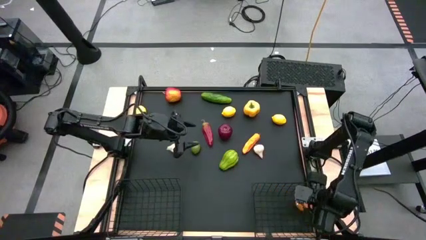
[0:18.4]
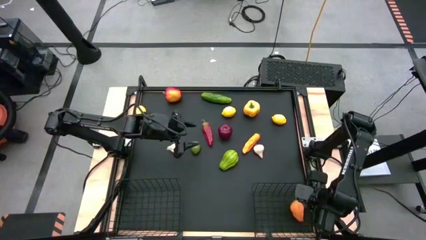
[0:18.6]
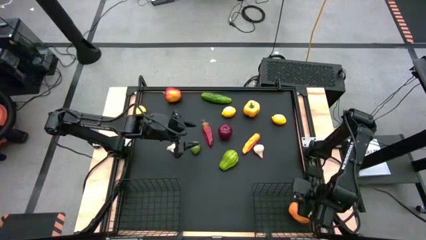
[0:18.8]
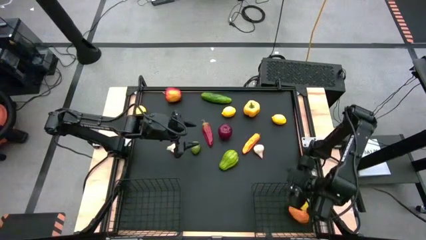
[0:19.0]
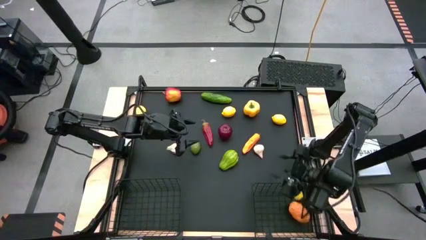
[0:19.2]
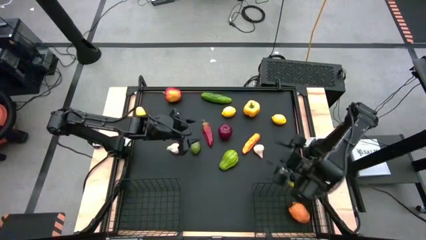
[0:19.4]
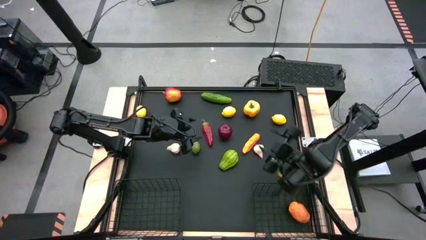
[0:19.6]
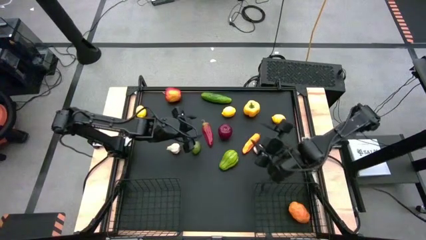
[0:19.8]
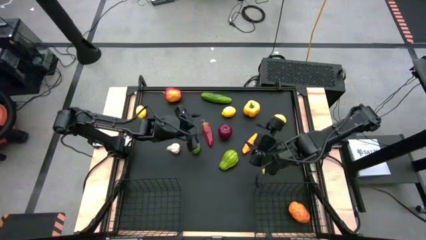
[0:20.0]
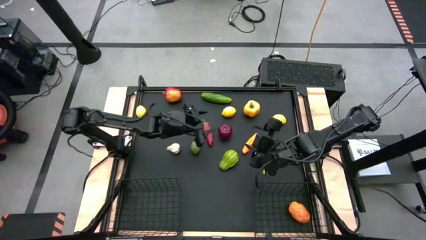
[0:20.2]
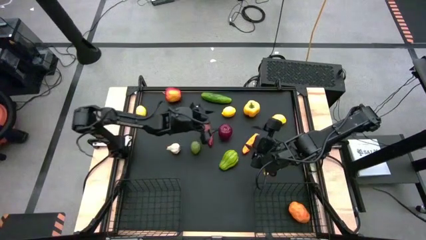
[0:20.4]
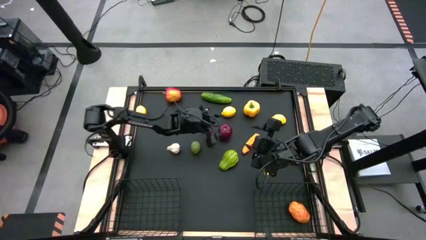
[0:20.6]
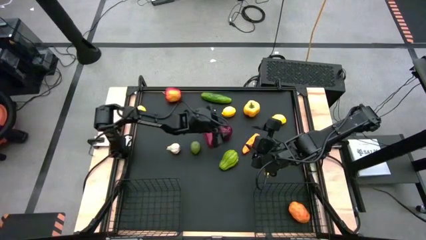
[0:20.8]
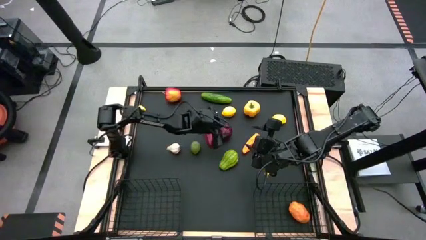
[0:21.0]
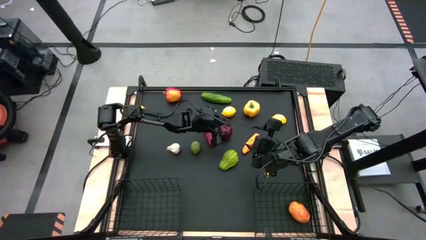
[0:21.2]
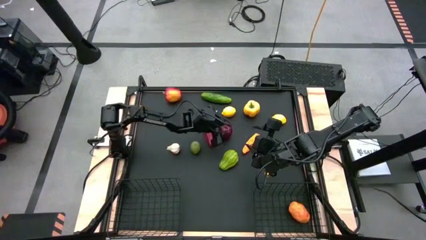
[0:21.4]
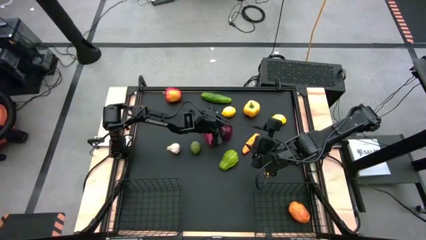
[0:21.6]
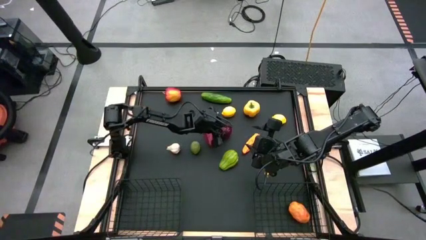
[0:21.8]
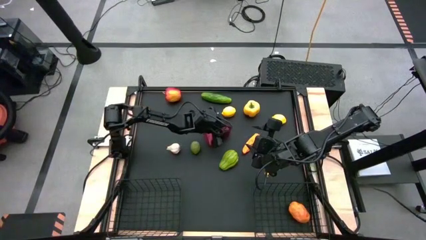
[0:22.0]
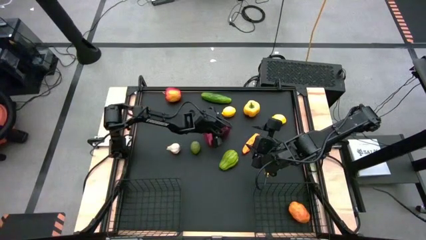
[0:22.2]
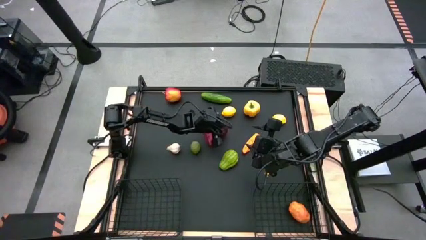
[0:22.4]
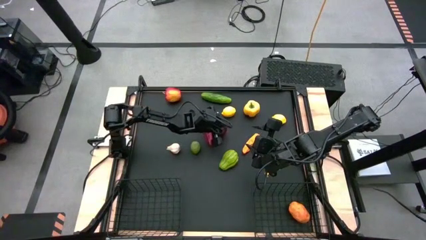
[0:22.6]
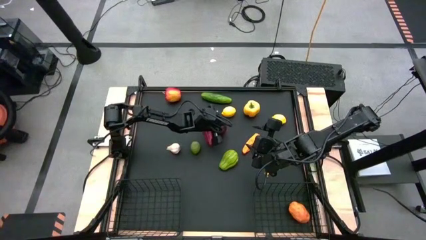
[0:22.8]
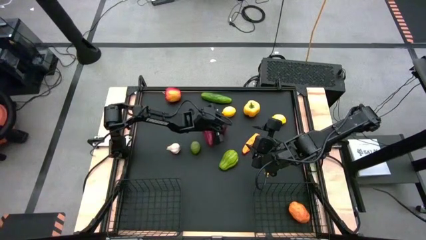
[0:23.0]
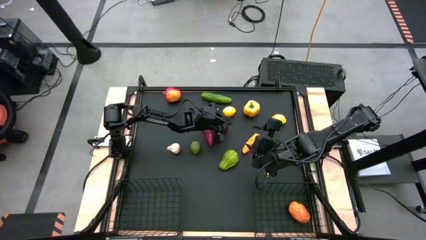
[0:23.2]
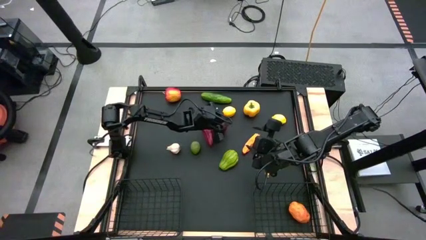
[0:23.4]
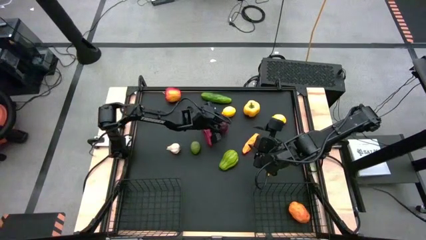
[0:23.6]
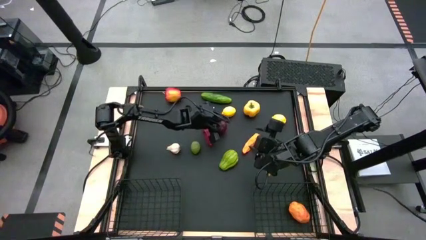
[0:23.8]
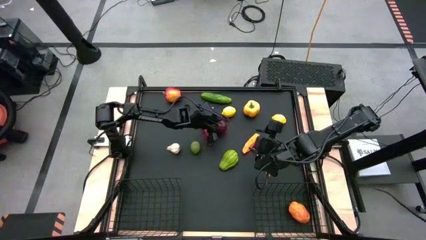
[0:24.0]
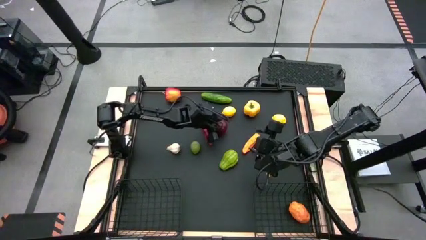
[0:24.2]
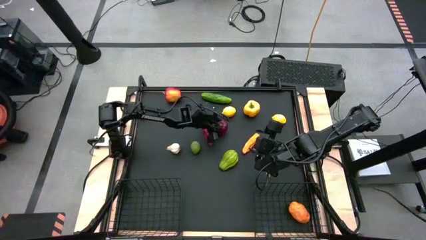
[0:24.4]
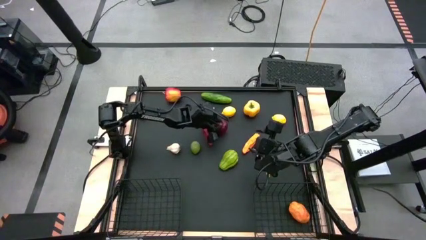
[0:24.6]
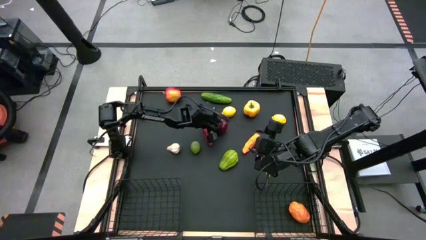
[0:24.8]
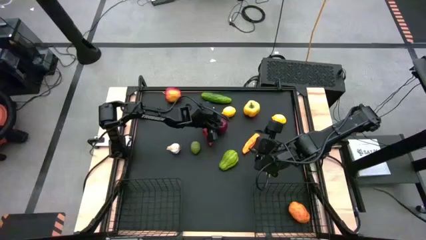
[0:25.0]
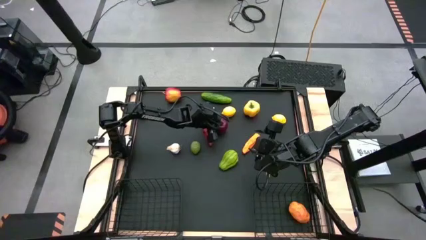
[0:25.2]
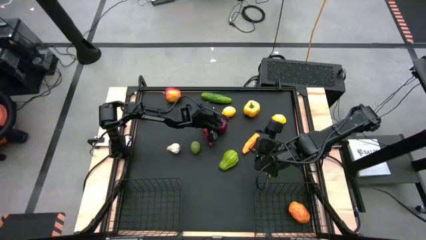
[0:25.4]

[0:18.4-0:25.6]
Task: Sort produce into baskets
Put the bottom red apple into the left wire basket

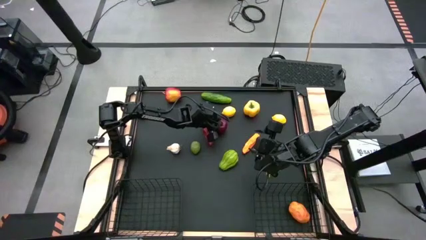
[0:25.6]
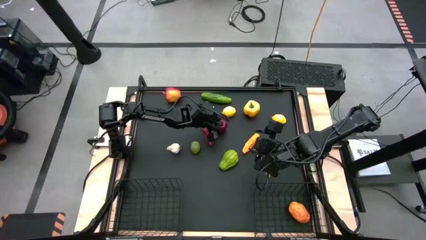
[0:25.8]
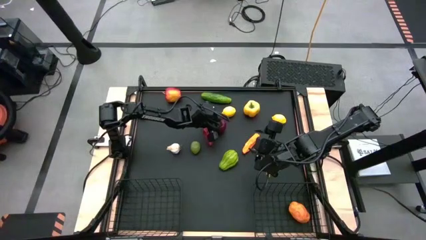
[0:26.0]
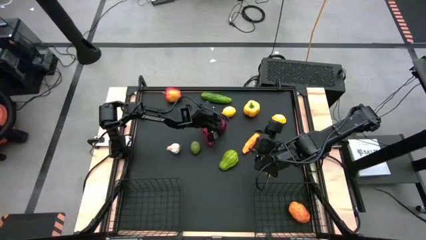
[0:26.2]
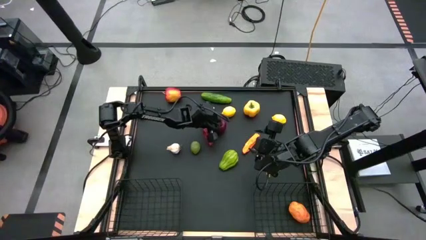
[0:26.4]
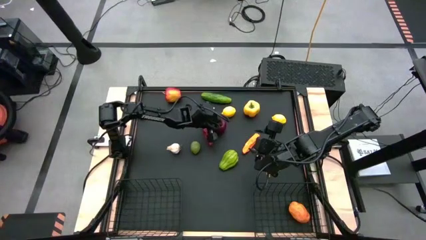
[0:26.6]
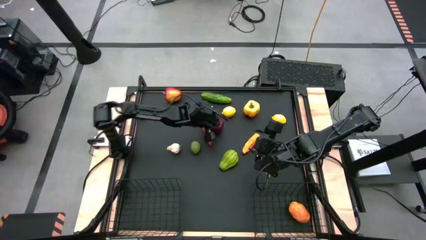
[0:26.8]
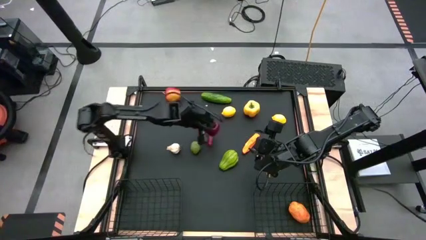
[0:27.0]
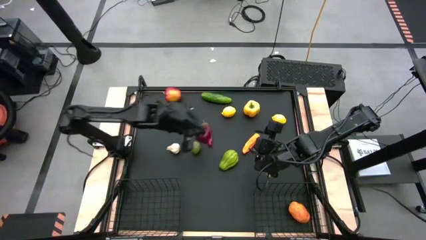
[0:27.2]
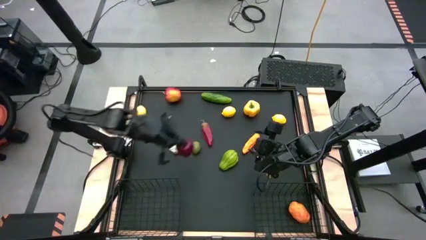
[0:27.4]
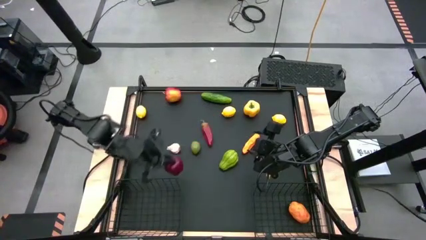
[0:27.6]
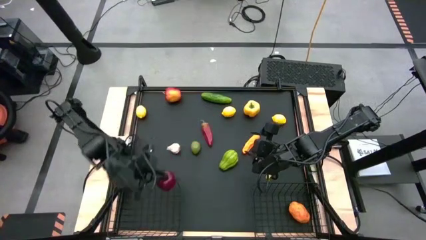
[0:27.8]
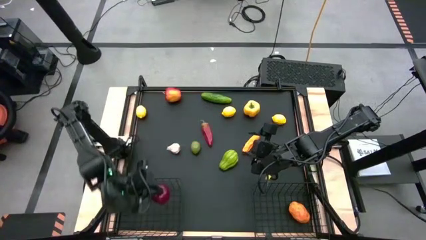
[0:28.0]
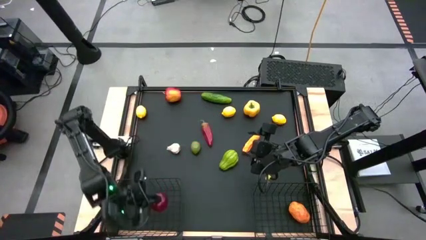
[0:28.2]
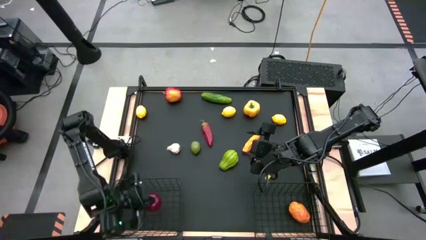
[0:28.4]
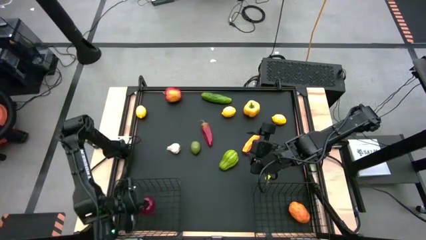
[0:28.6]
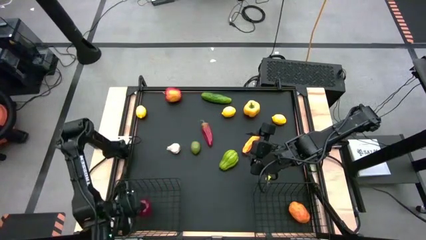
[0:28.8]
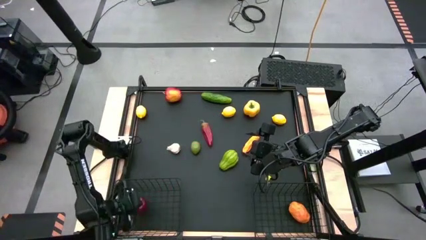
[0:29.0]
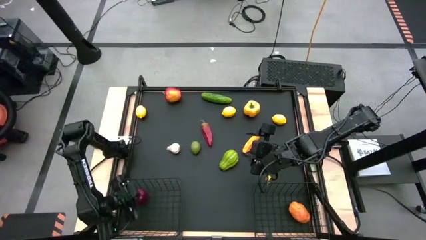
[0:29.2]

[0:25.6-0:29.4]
Put the bottom red apple into the left wire basket

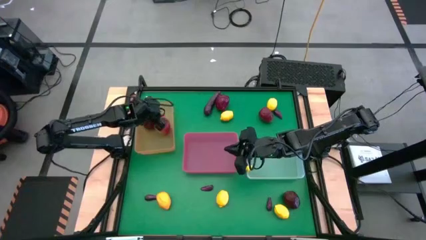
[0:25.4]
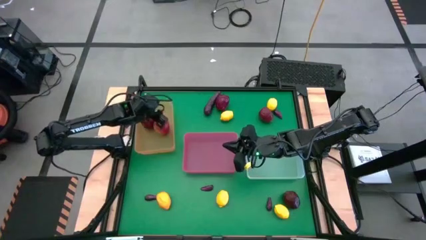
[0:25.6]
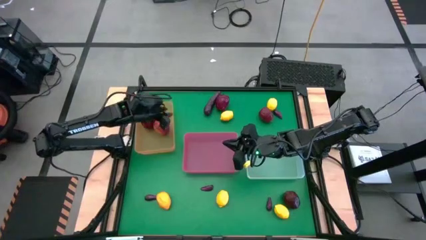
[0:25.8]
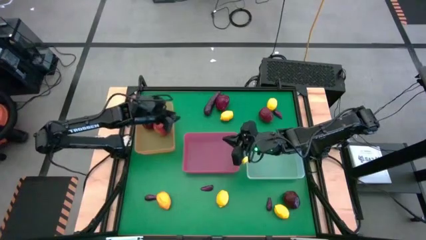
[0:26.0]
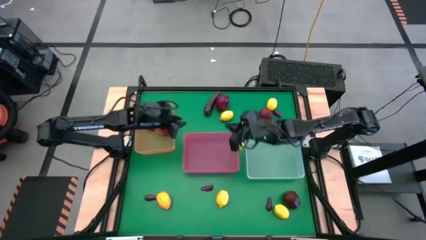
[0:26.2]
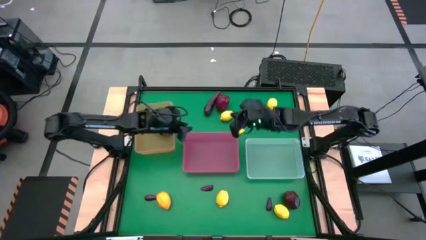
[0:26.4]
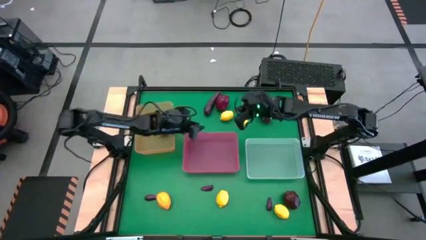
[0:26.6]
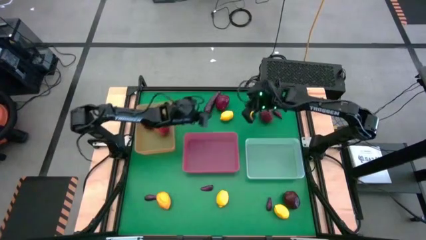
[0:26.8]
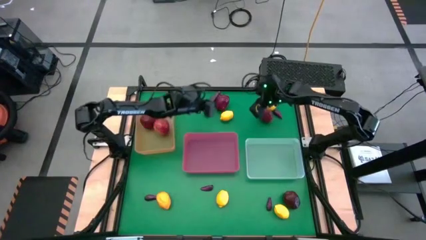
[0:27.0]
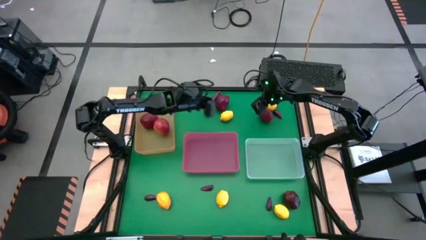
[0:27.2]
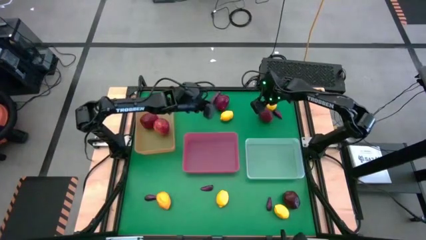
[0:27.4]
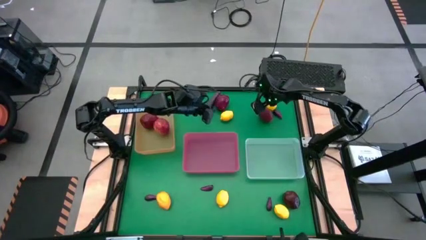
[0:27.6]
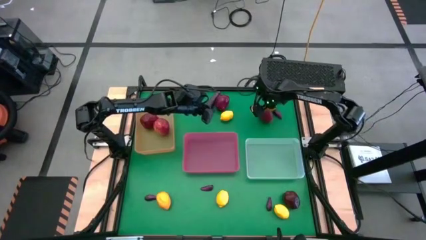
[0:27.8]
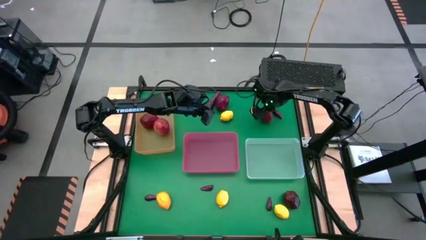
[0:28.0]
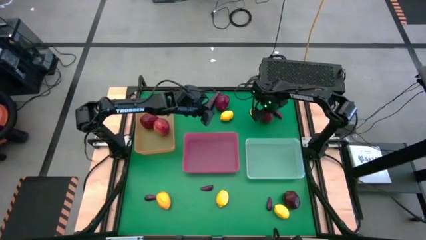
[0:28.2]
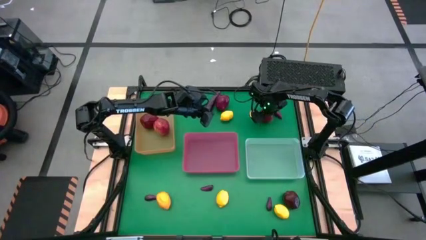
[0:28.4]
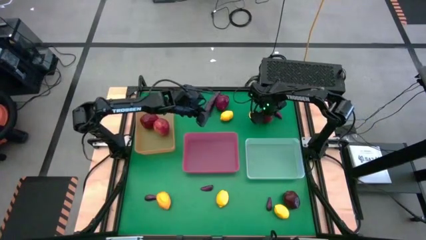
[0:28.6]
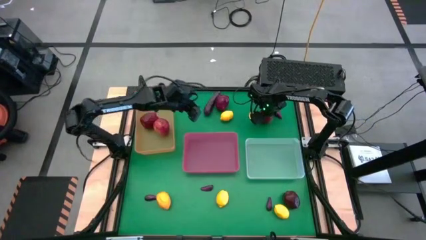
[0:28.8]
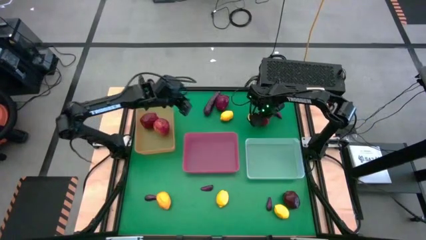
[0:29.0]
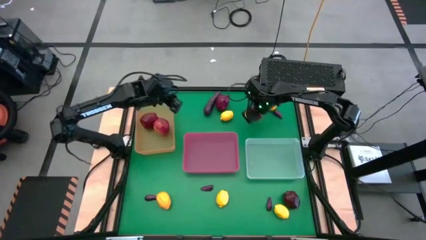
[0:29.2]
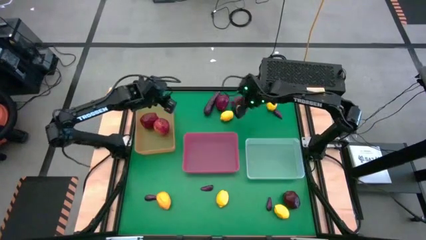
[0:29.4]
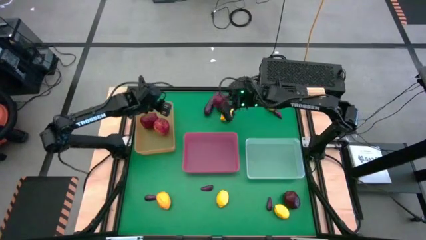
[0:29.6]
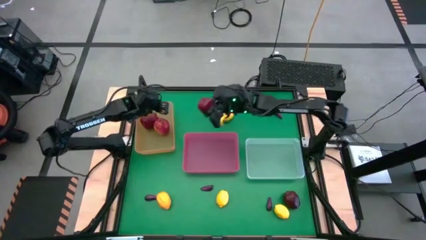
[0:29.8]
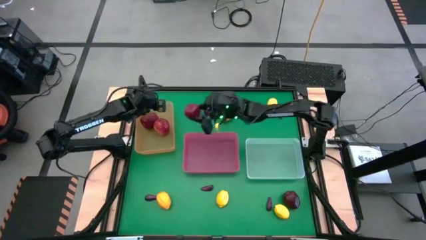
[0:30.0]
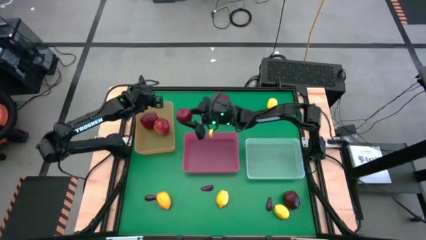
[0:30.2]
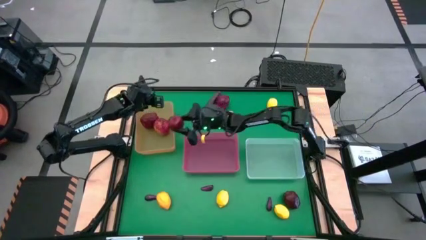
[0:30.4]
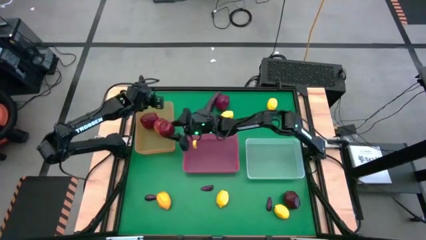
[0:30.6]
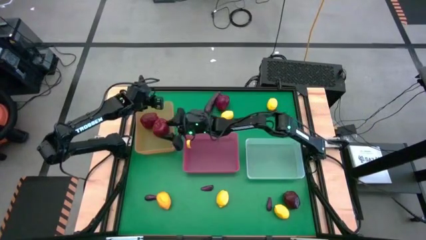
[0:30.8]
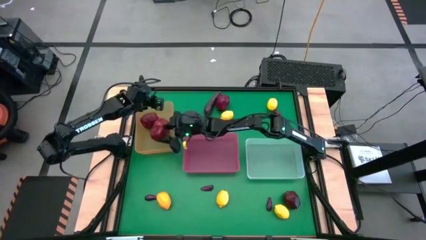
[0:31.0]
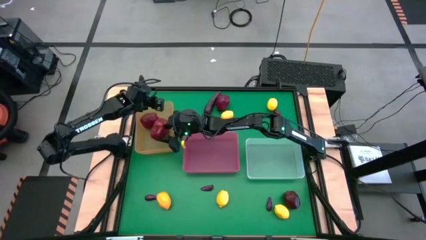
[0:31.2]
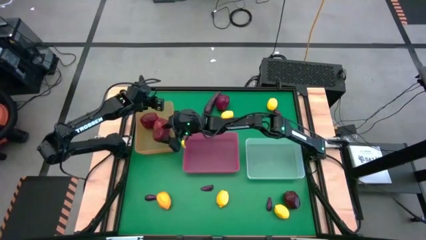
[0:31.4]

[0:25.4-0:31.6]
Task: Sort produce into baskets
Put the red apple into the orange bin
